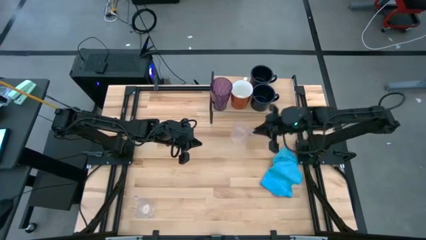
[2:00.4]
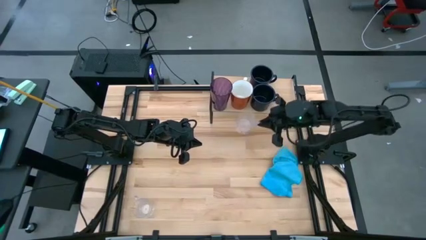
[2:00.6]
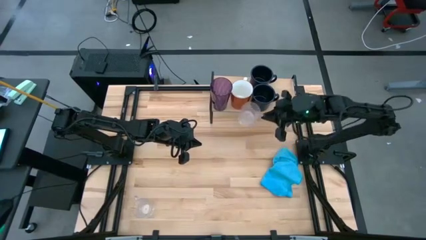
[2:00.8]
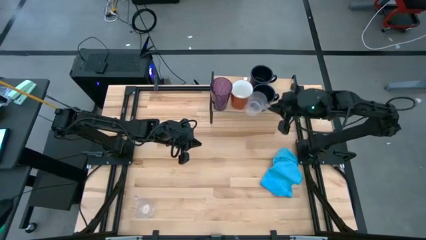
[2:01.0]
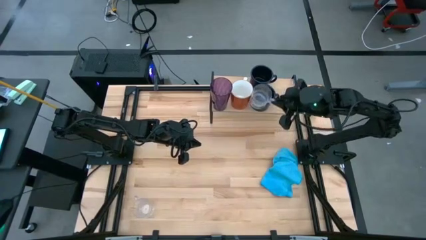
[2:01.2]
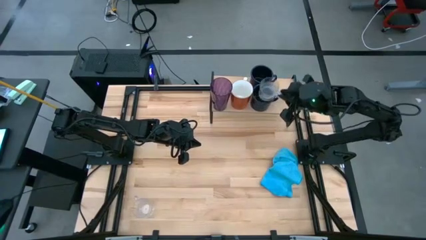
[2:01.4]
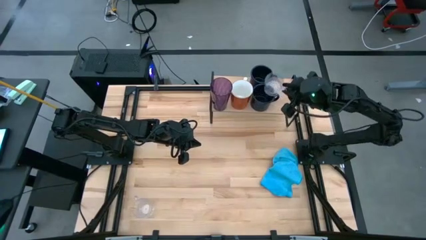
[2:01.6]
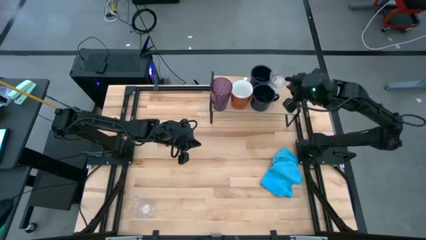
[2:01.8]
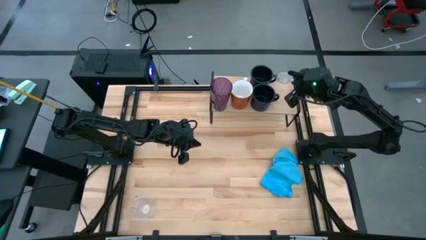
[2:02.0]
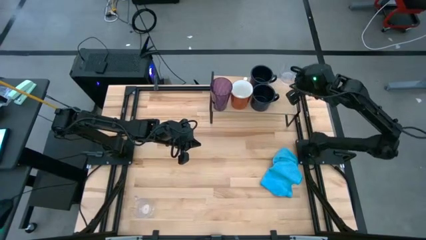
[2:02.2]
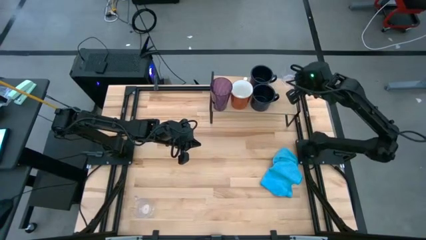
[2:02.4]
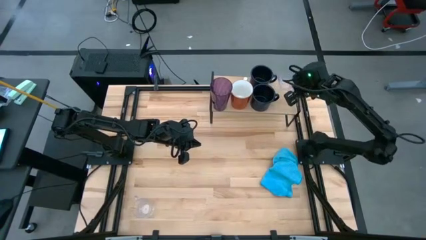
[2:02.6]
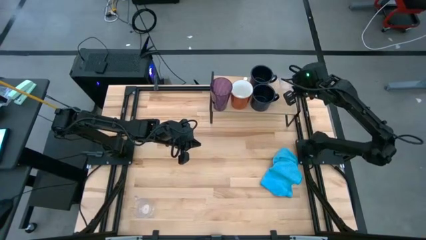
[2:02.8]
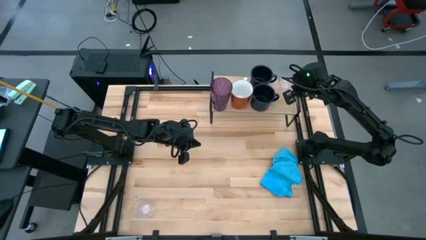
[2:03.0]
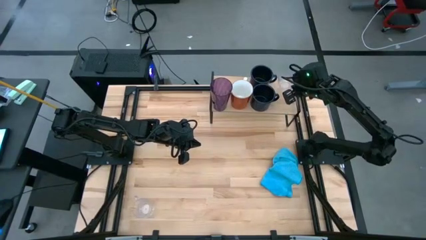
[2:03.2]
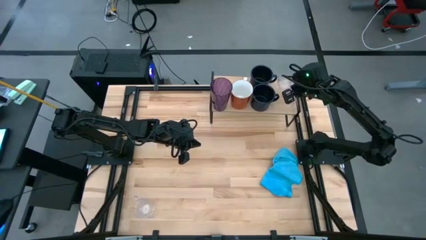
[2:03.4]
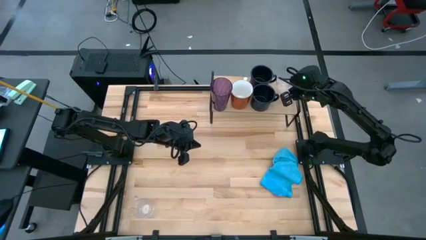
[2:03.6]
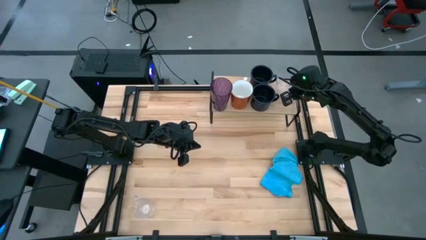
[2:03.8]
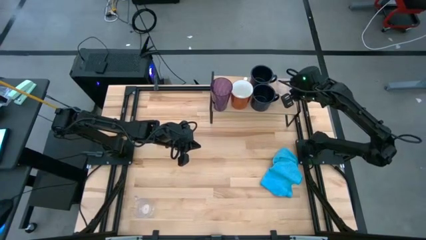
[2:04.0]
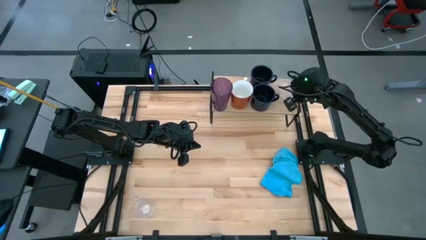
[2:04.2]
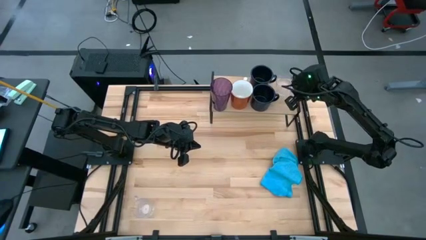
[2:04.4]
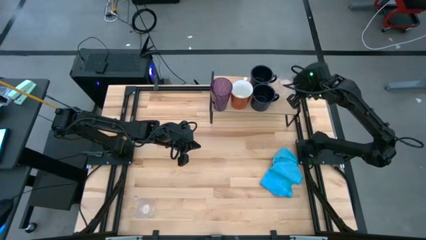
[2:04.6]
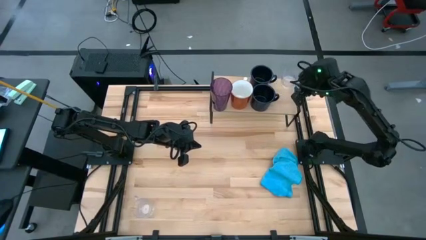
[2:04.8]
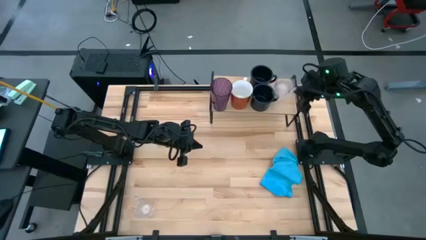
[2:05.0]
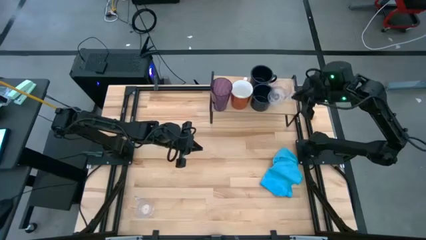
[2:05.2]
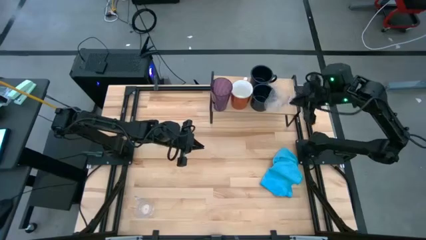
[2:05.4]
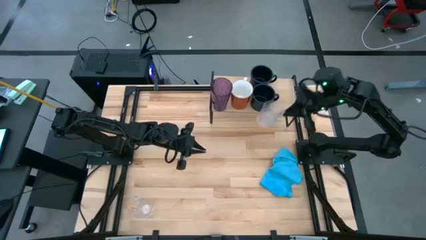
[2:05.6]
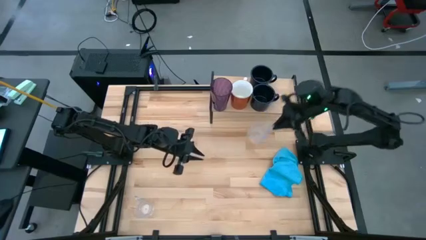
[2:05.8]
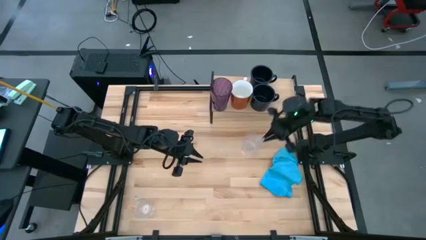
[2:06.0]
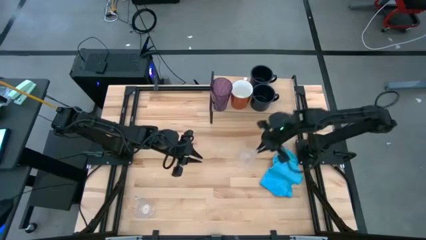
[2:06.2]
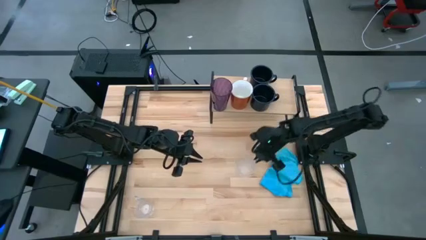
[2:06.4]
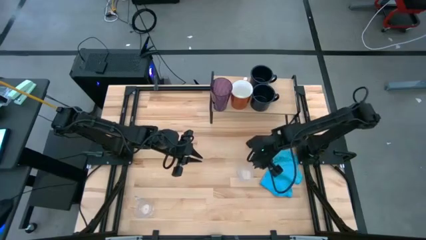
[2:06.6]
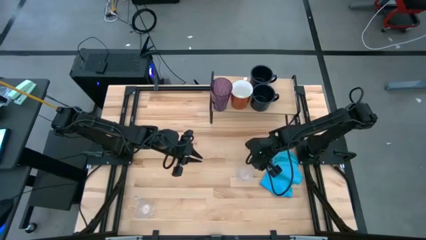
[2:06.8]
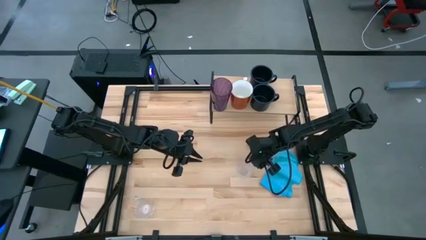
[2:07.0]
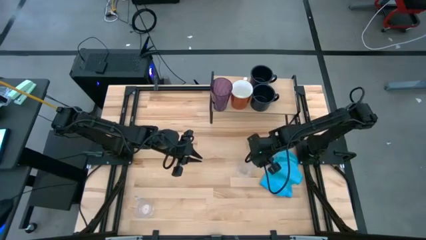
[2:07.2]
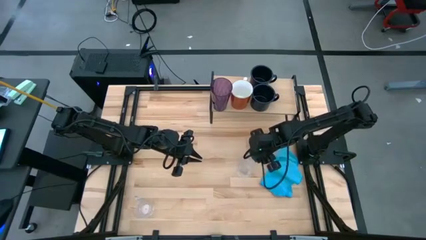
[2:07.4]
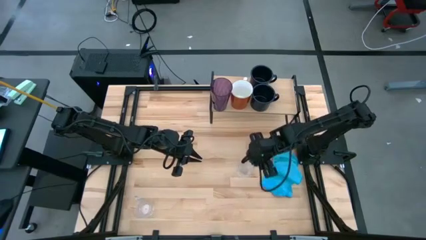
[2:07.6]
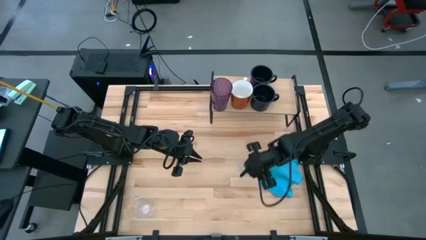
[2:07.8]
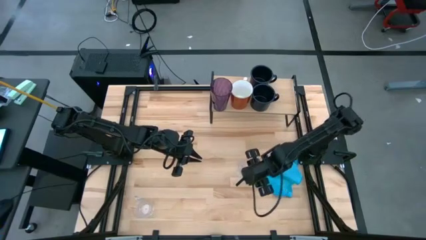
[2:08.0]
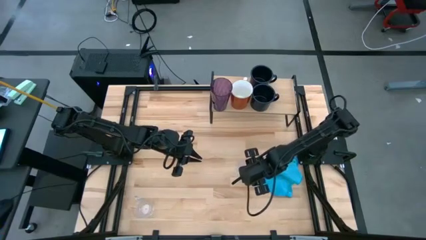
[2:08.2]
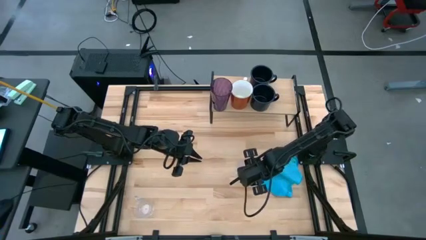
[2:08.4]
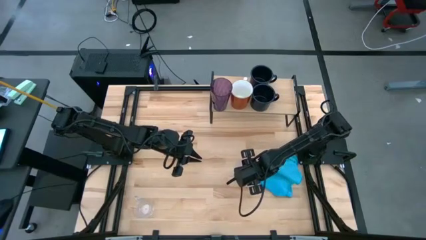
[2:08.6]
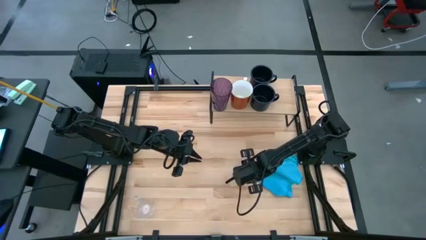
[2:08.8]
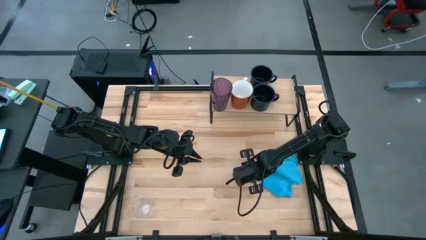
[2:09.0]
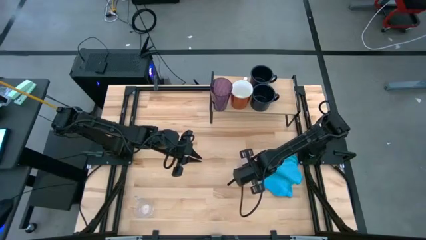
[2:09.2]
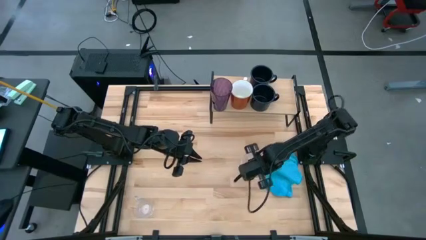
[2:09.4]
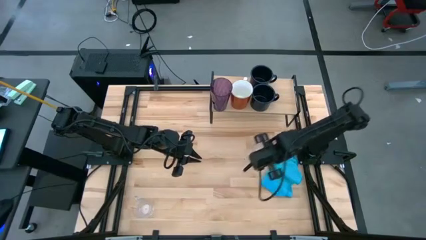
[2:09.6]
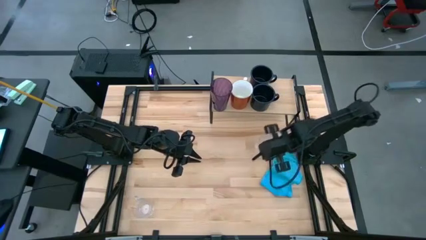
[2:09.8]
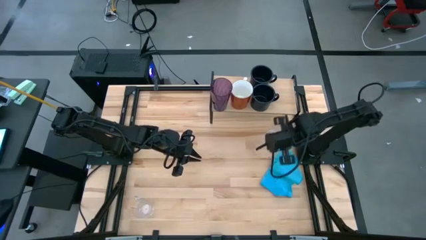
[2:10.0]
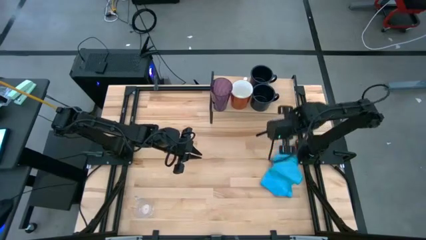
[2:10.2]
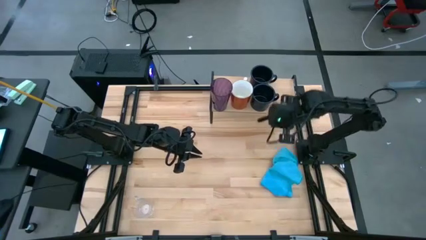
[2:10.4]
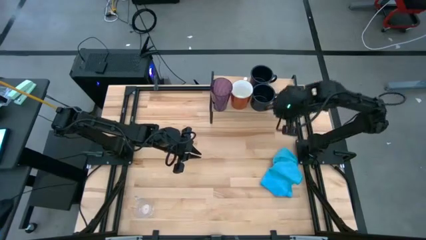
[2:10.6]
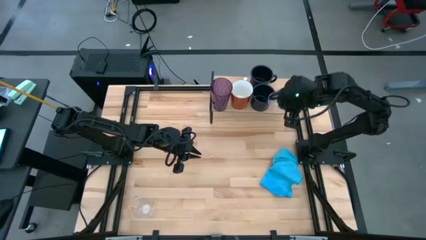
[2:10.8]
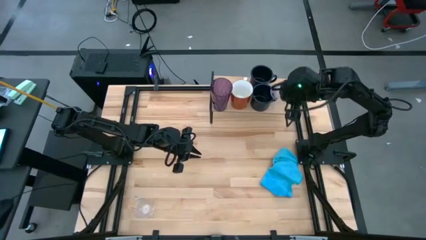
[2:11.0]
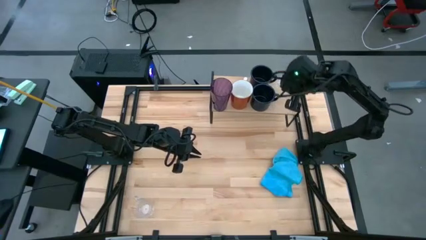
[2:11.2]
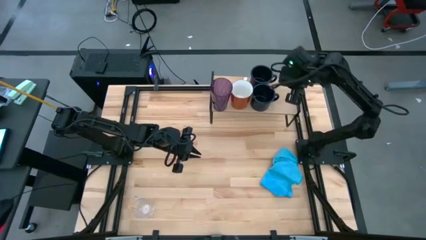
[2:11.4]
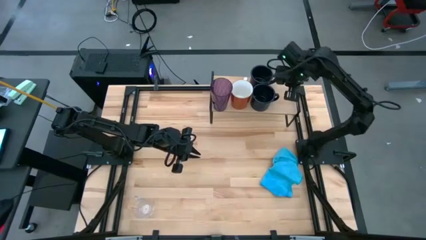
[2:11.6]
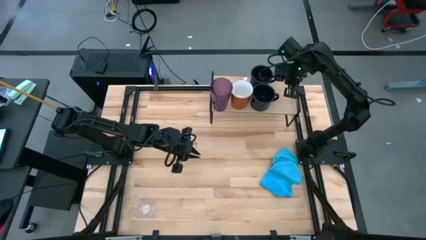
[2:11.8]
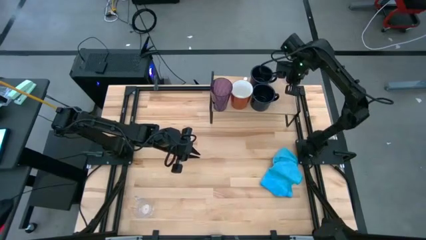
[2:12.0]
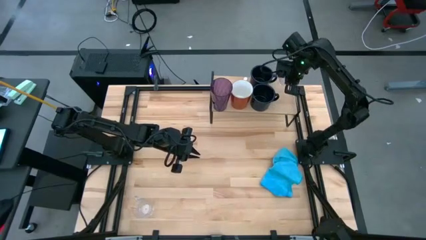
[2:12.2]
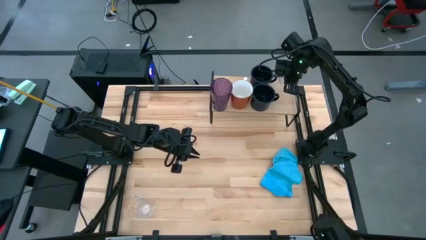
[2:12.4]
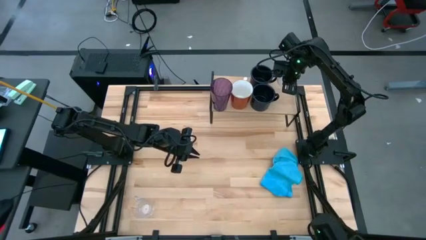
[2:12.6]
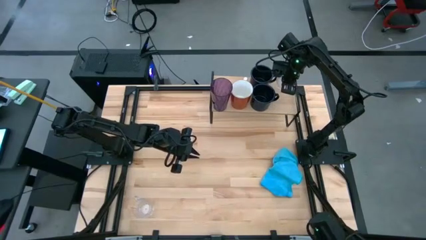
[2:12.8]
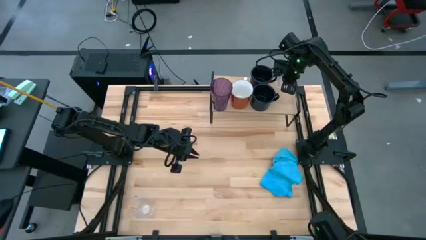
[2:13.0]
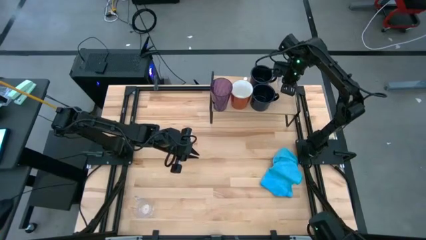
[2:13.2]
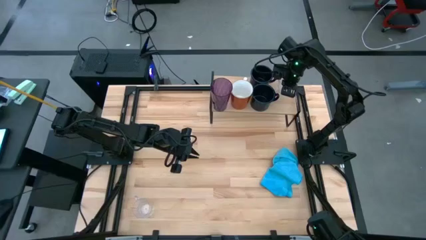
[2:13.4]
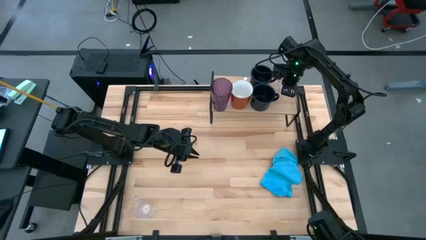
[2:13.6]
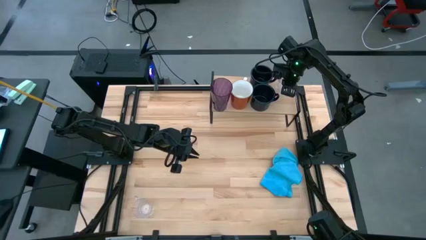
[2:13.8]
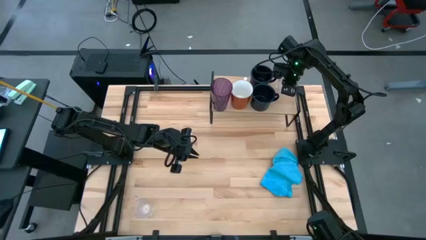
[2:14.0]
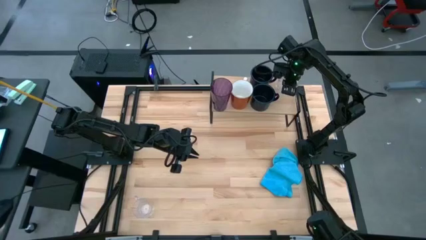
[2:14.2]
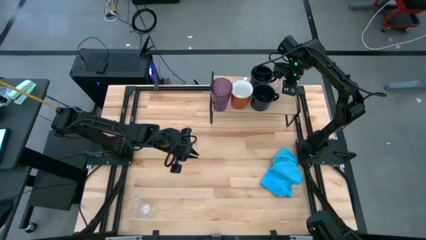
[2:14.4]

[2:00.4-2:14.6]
Task: Stack small to large cups/mugs on shelf
Put the top transparent mug on the shelf

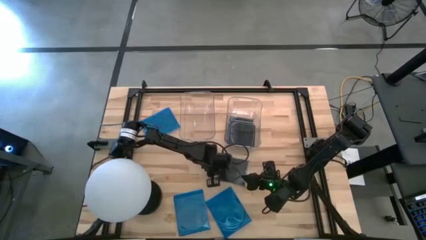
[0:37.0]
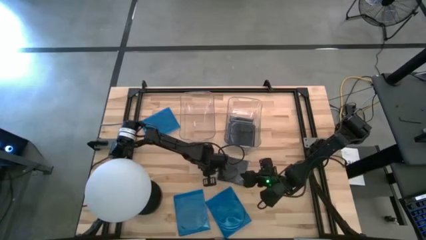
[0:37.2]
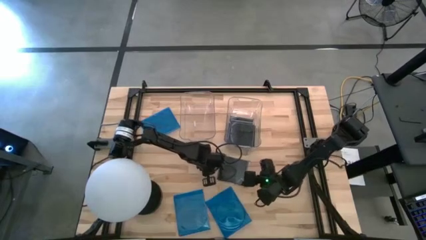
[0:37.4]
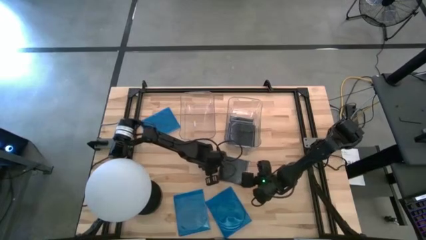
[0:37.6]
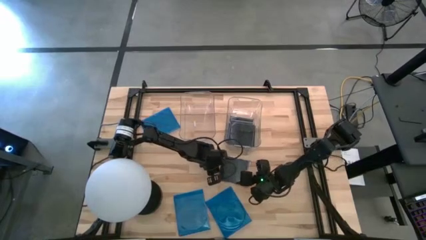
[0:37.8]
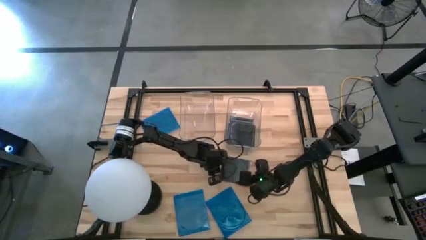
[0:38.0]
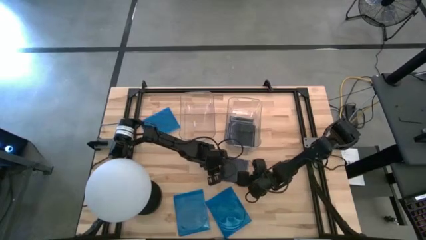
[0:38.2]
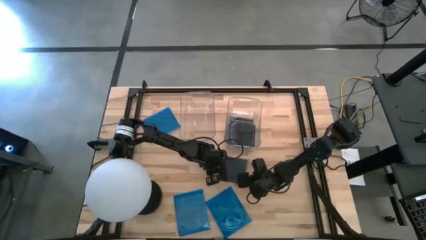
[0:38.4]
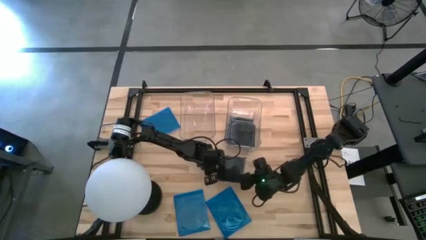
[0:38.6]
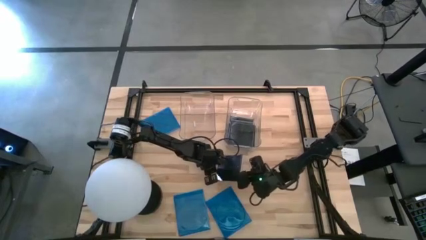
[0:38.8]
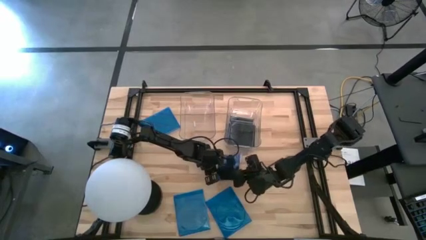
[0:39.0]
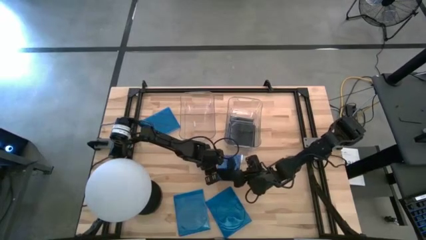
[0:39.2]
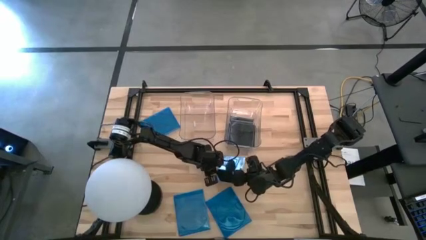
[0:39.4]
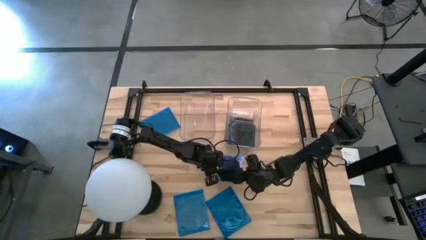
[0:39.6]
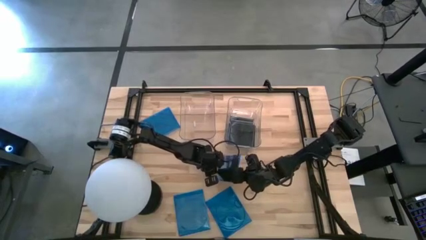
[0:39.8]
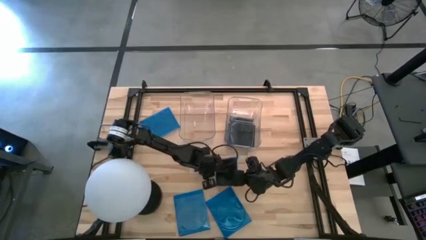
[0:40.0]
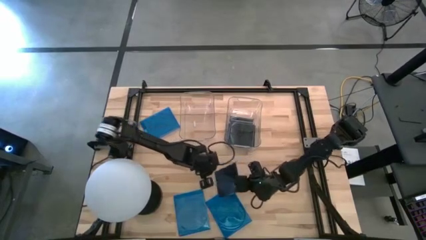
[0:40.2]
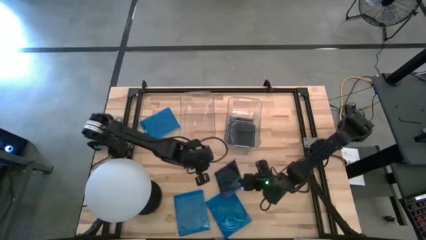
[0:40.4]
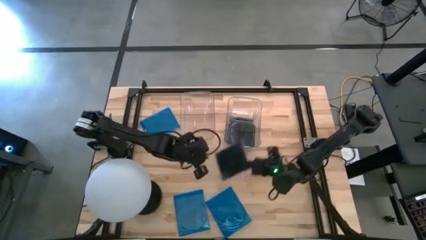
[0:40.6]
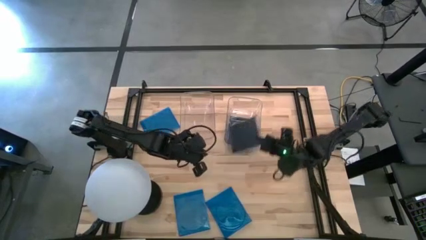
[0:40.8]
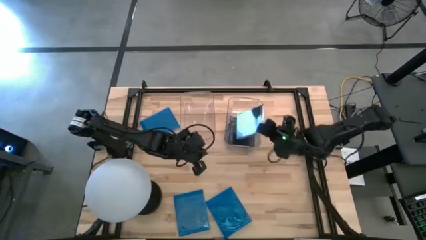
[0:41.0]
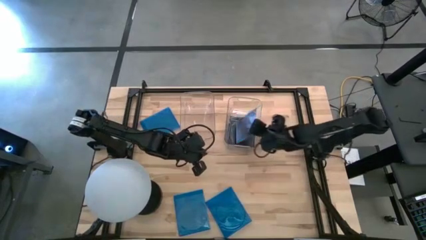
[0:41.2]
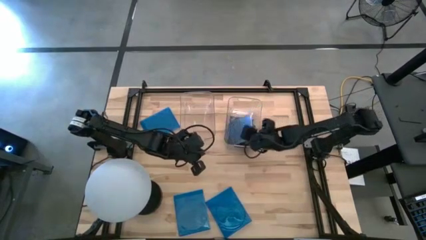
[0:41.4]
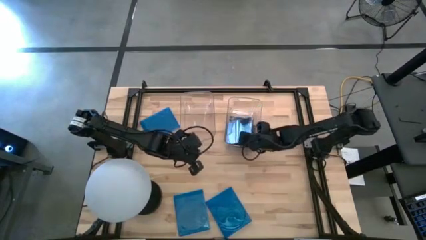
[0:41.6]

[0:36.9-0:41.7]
Task: Pick & place jewel cases by type
Put the black CD case into the right transparent bin
